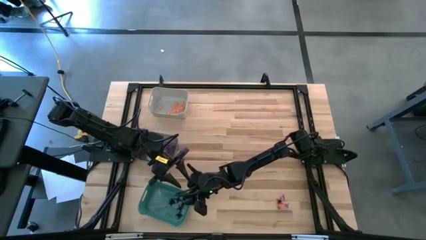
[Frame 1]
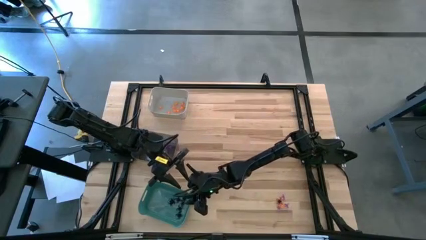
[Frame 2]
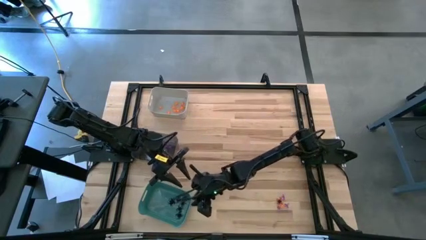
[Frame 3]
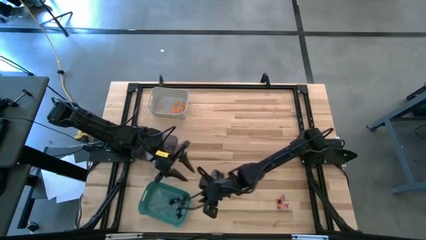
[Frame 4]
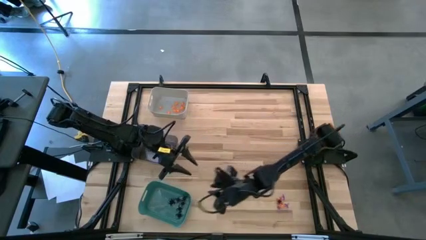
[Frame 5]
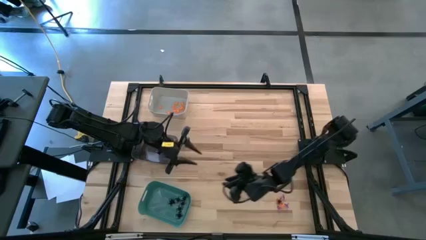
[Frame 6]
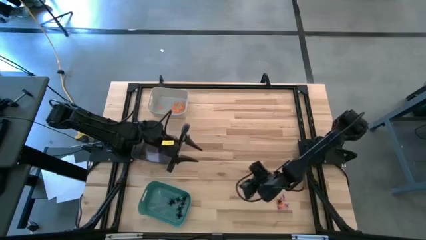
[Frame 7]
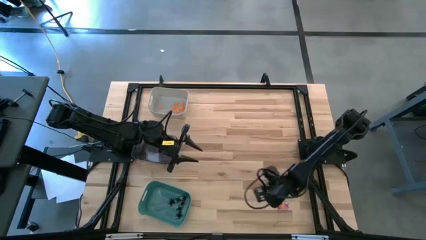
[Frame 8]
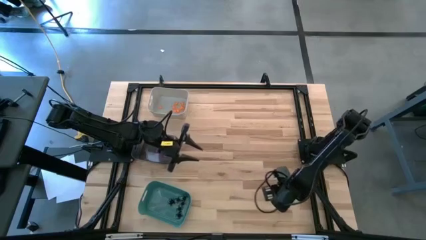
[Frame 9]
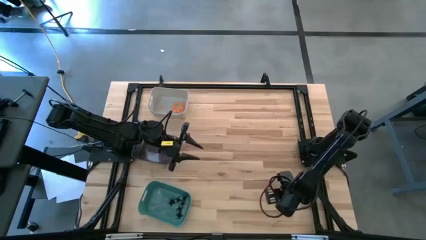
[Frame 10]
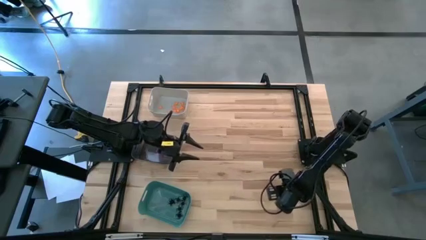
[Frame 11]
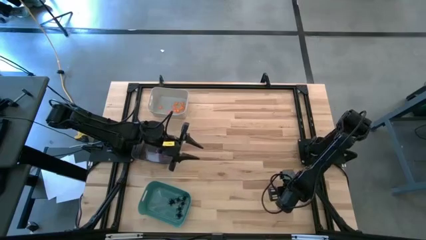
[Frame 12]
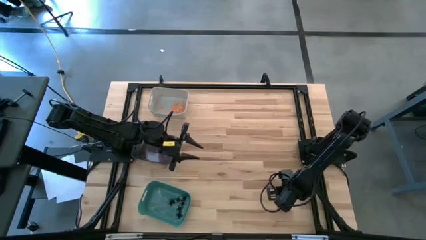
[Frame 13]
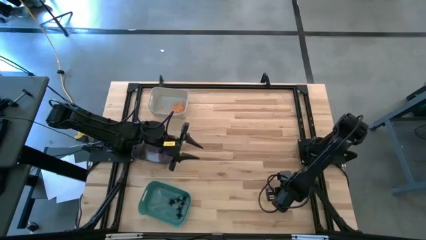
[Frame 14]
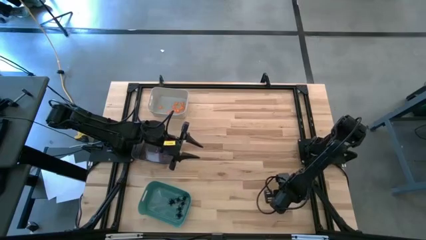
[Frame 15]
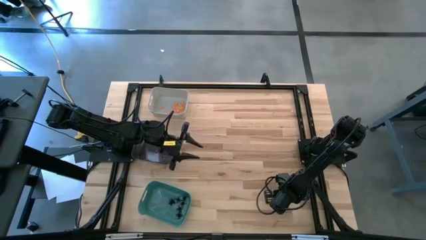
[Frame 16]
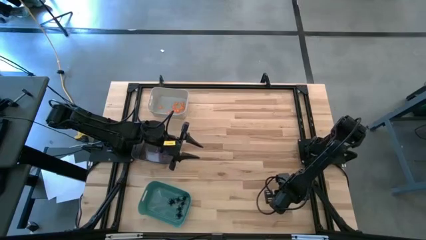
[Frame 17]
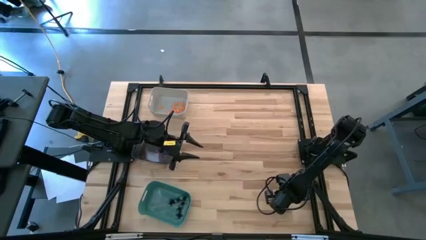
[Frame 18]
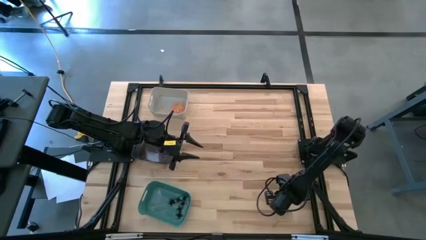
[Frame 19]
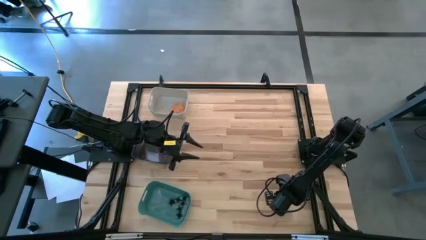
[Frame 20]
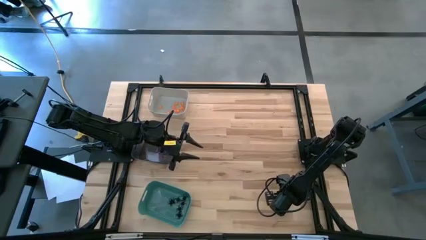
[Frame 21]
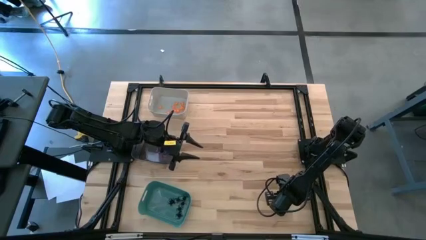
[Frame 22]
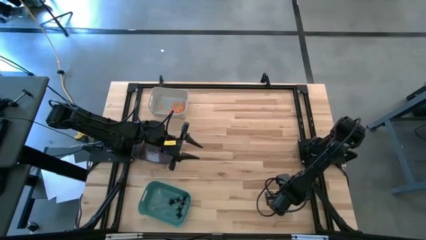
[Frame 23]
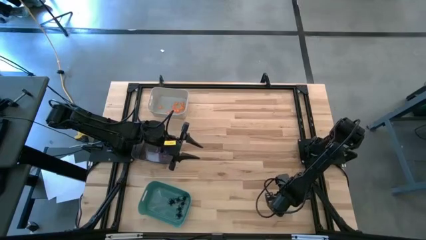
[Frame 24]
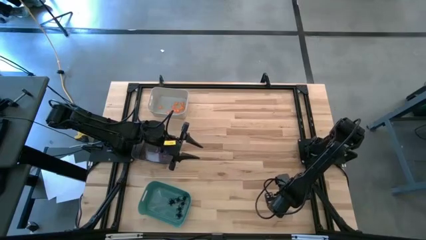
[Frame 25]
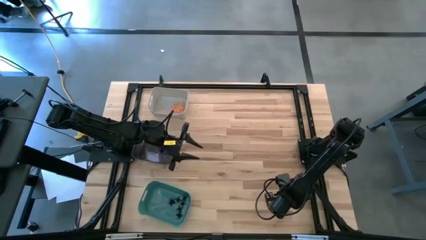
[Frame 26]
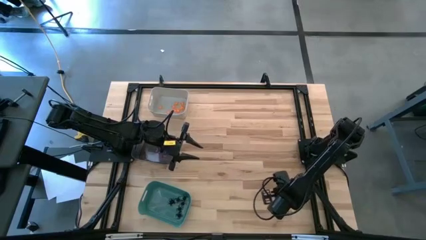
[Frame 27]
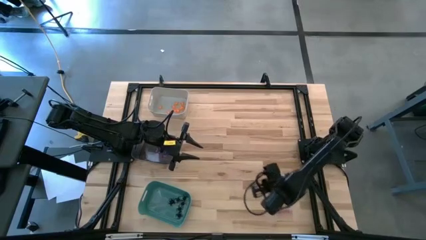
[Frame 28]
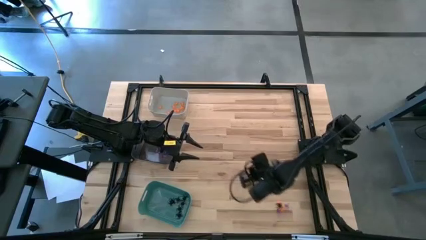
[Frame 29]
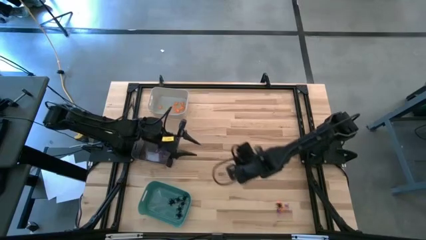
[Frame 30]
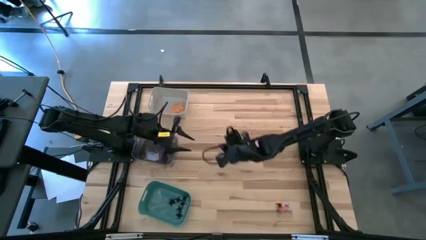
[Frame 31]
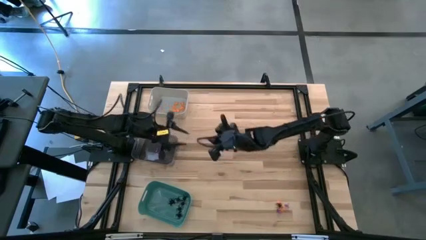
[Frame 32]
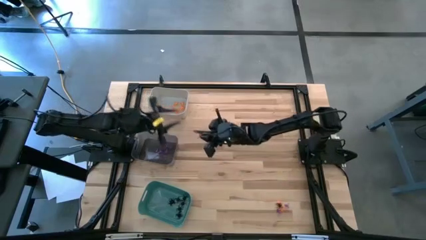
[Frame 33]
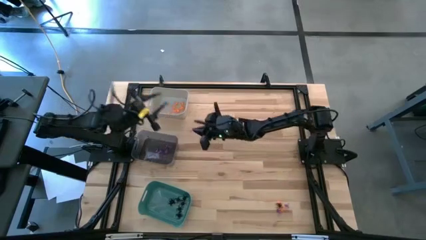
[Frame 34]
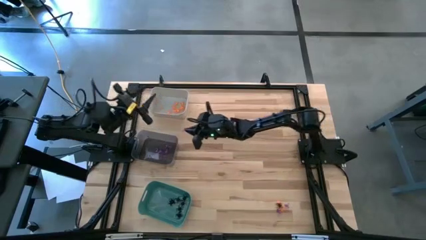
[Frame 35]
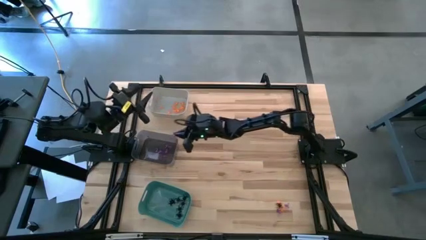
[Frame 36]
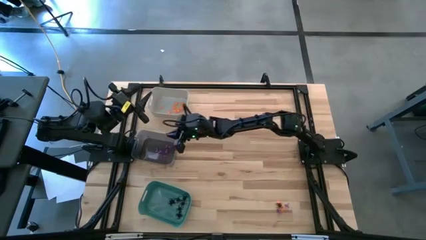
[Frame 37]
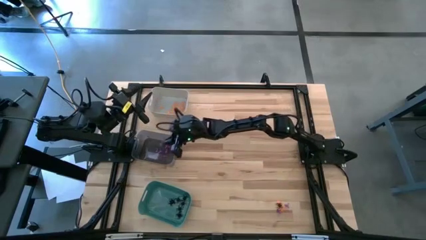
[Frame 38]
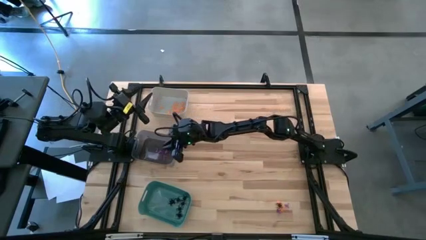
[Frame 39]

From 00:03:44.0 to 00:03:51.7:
Task: Sort Halloween decoration
Put the bottom right violet witch hat into the black bin

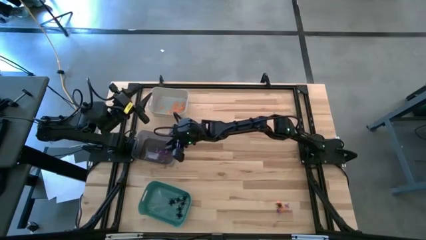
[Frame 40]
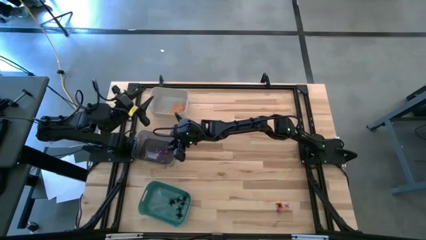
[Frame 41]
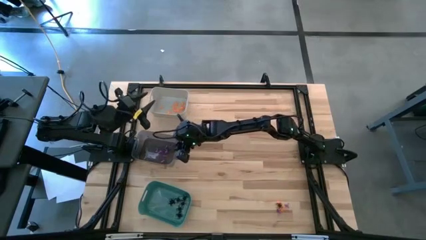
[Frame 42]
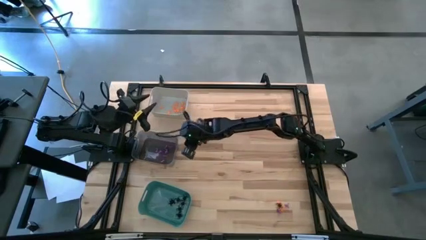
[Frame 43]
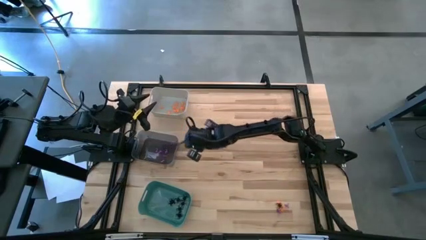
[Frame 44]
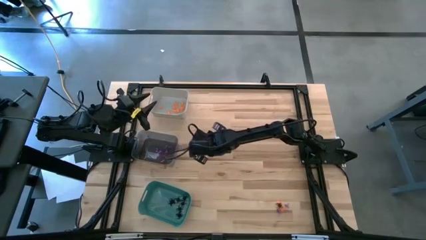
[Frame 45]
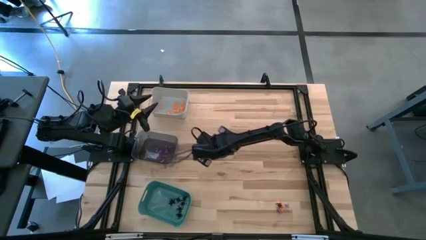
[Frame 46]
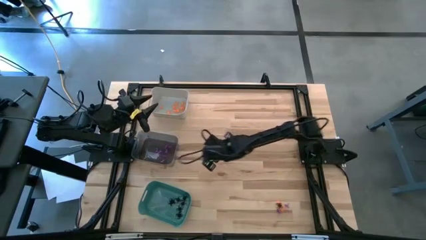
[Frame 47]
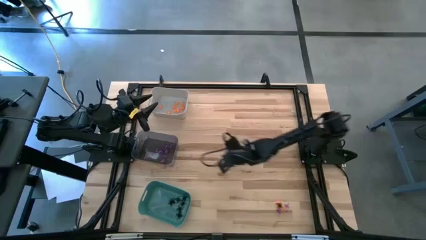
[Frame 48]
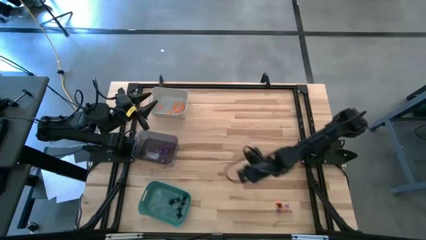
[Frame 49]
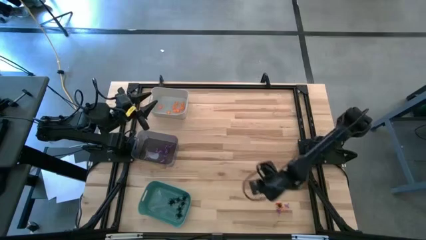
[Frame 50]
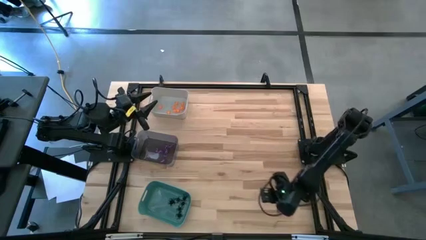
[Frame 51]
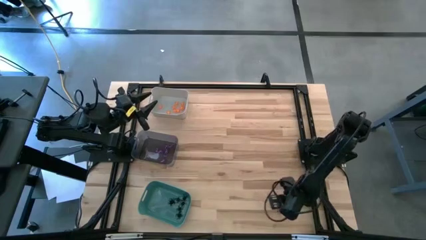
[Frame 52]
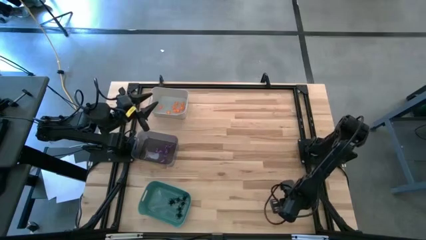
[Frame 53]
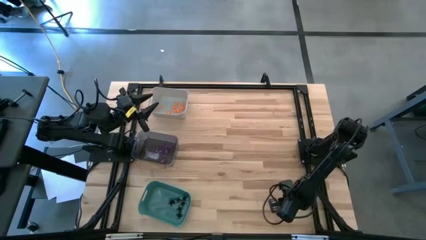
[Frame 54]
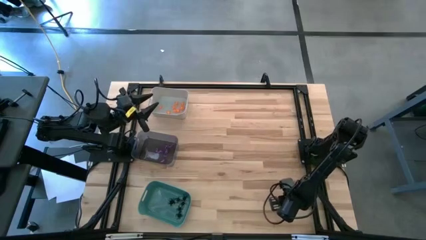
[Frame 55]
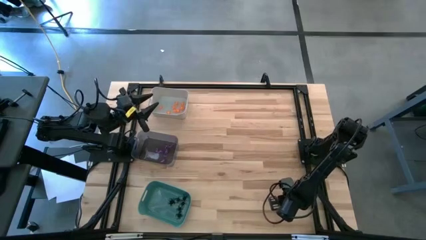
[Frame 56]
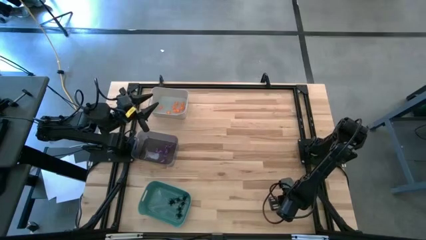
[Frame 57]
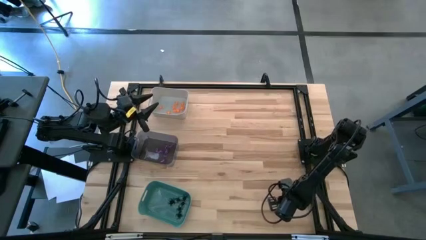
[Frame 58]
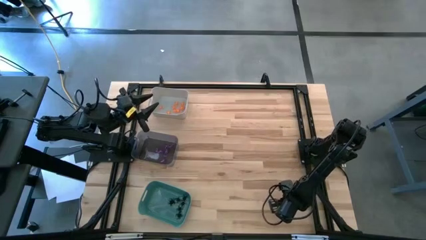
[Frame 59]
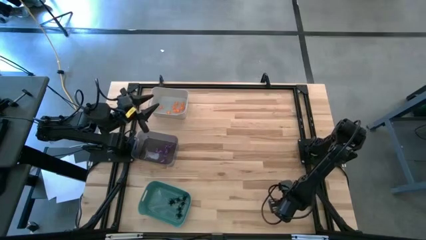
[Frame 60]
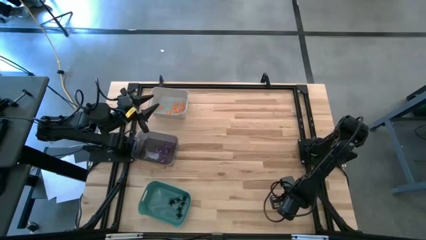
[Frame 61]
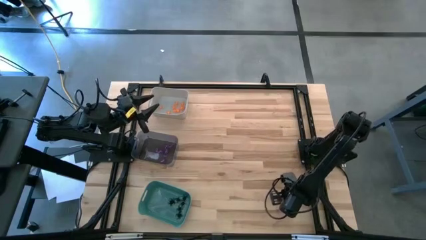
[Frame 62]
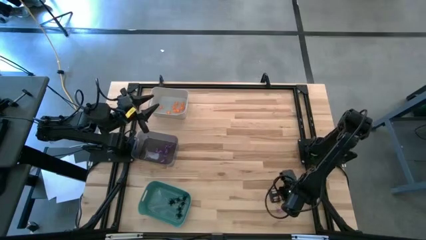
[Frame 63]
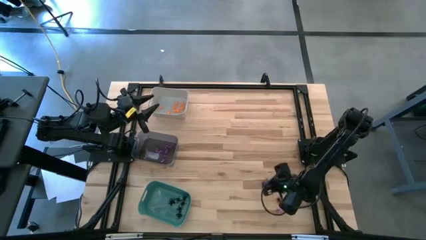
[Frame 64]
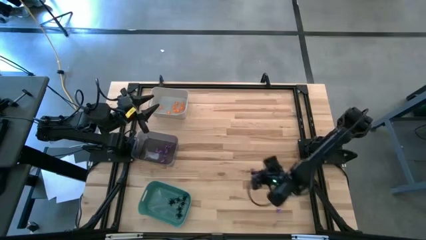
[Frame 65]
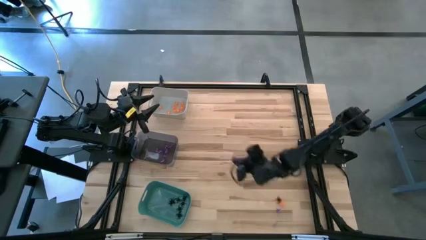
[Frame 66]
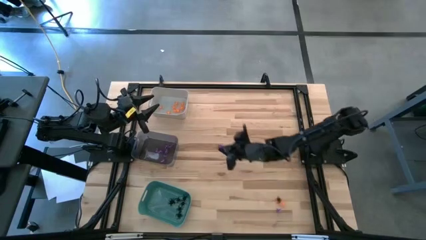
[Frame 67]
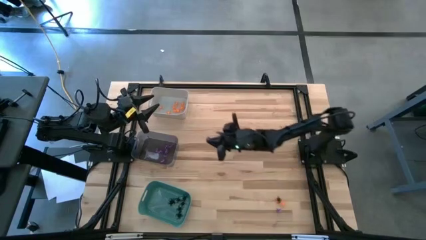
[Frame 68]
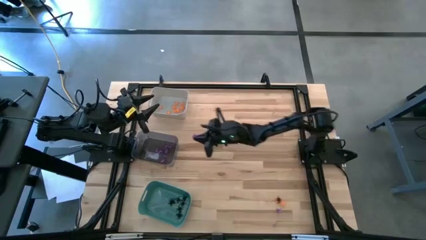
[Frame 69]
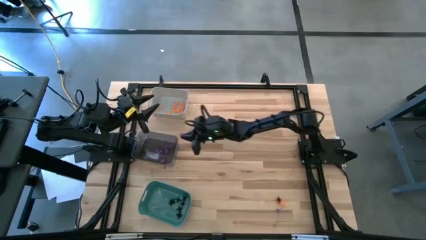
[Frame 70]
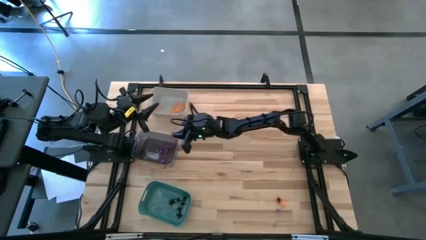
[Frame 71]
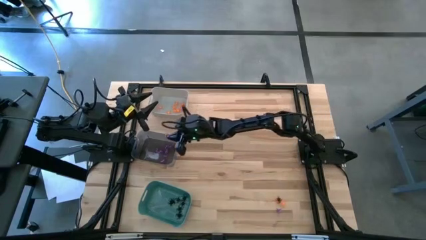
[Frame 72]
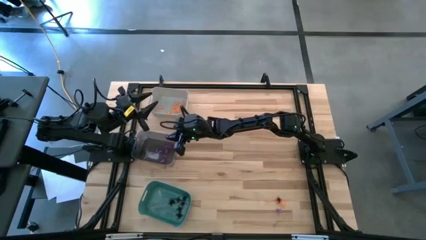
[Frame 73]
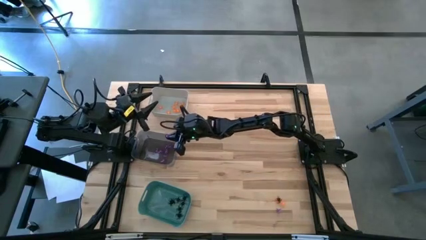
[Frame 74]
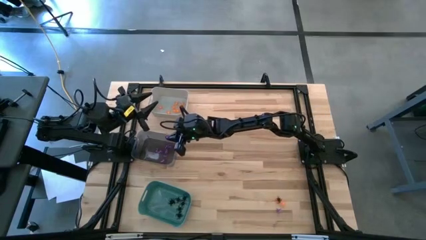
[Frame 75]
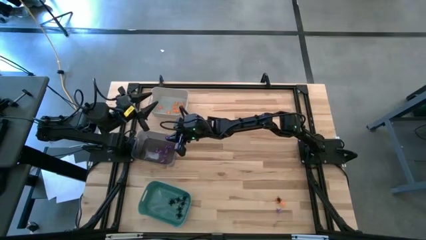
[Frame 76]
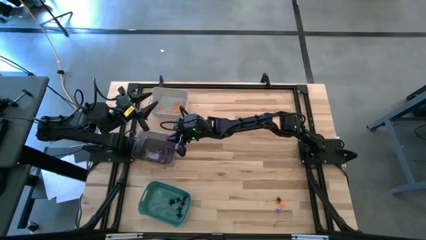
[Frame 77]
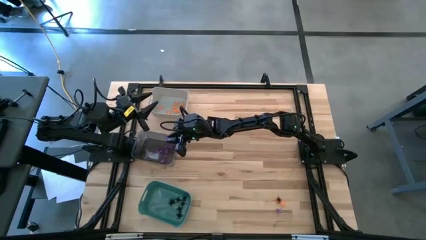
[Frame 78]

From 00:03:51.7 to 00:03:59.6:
Put the right violet witch hat into the black bin
